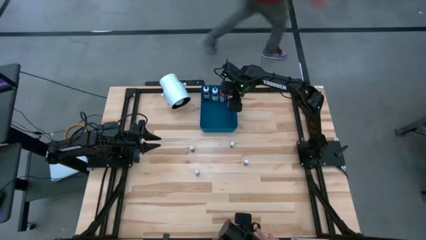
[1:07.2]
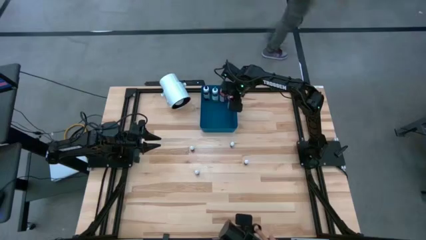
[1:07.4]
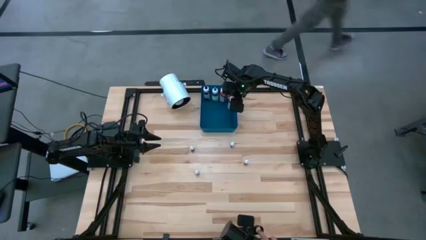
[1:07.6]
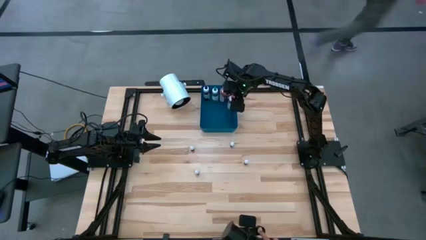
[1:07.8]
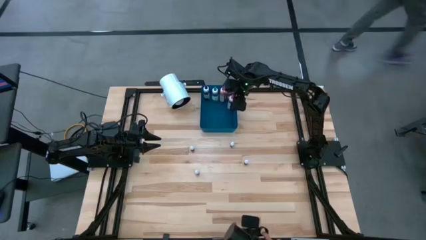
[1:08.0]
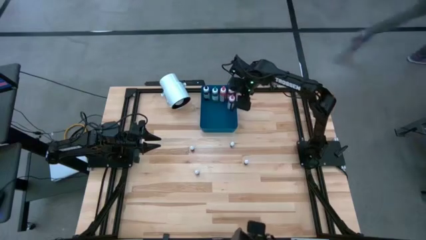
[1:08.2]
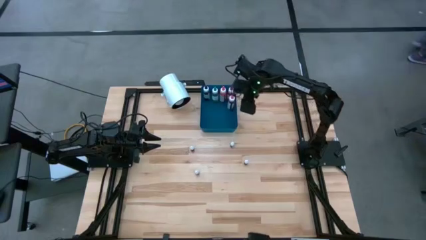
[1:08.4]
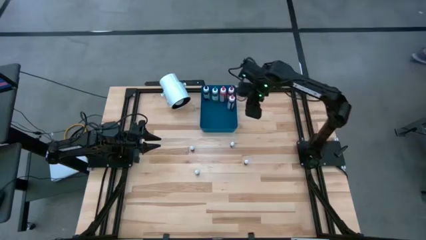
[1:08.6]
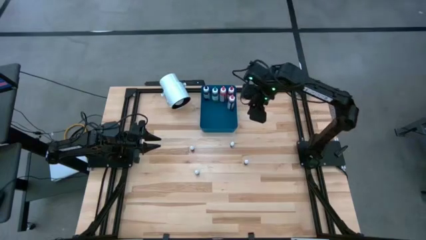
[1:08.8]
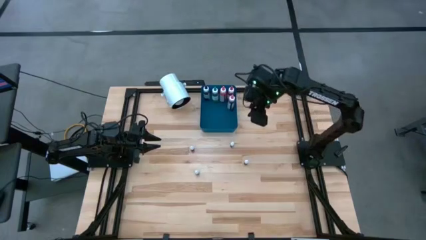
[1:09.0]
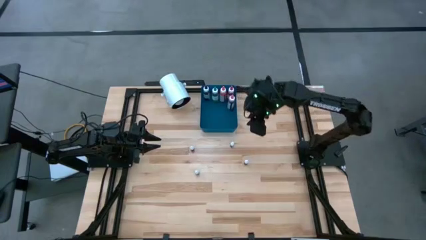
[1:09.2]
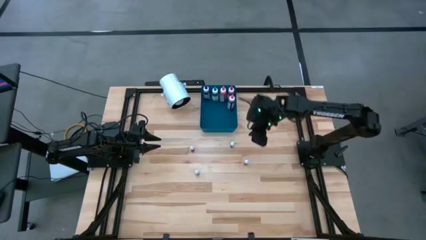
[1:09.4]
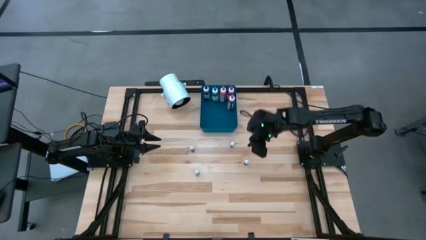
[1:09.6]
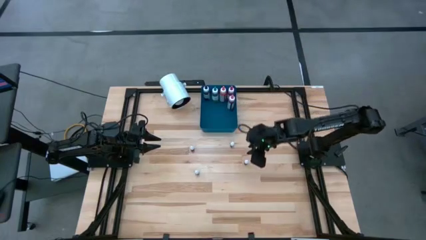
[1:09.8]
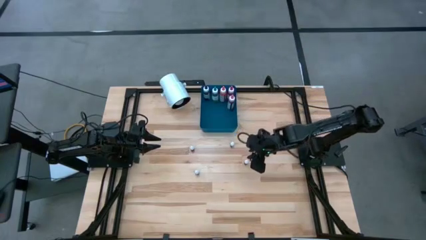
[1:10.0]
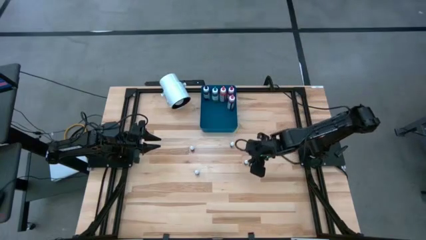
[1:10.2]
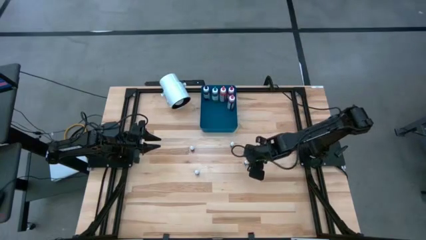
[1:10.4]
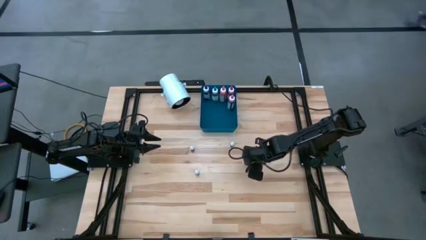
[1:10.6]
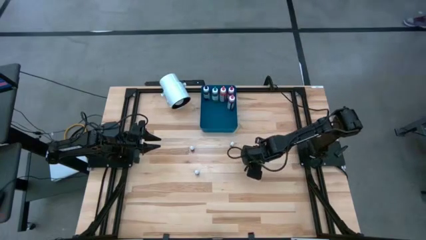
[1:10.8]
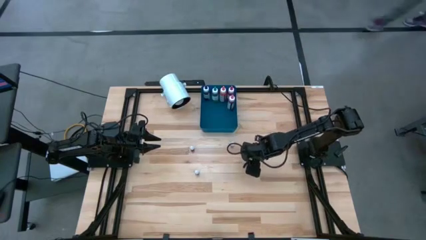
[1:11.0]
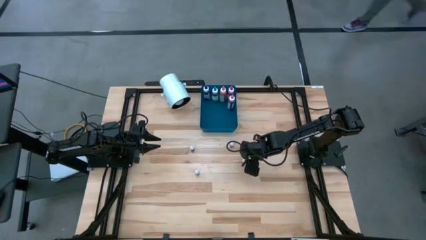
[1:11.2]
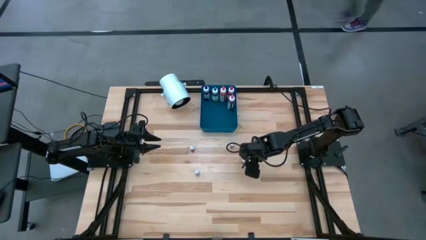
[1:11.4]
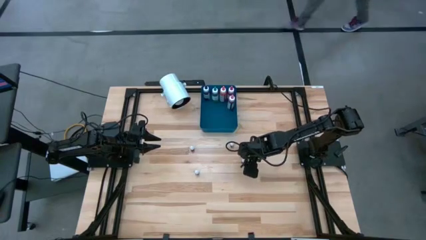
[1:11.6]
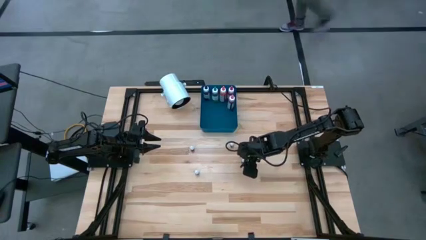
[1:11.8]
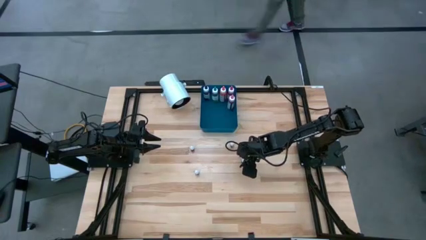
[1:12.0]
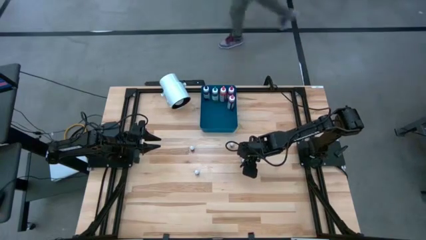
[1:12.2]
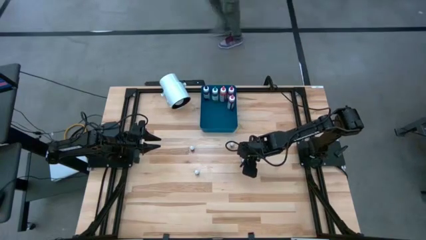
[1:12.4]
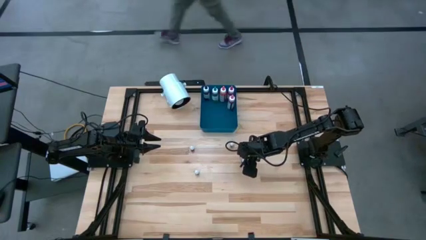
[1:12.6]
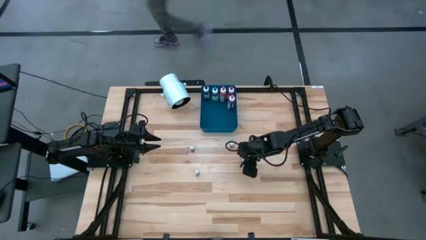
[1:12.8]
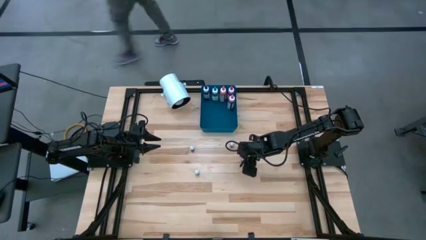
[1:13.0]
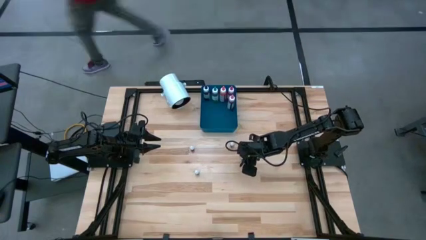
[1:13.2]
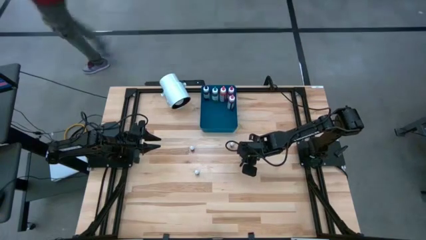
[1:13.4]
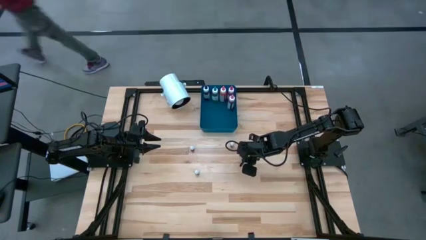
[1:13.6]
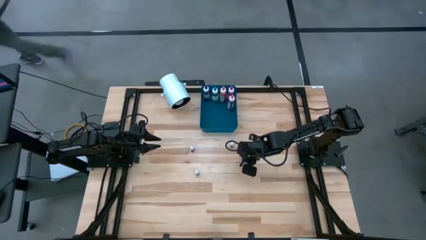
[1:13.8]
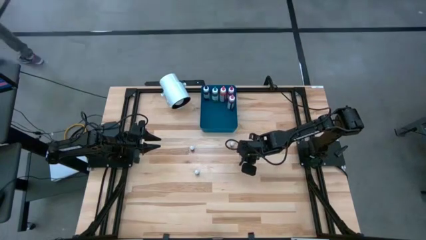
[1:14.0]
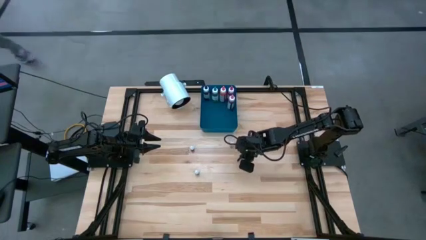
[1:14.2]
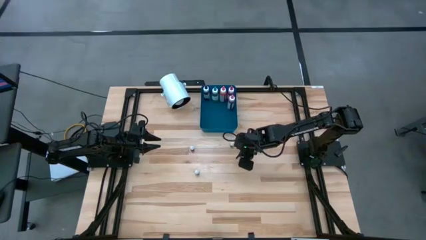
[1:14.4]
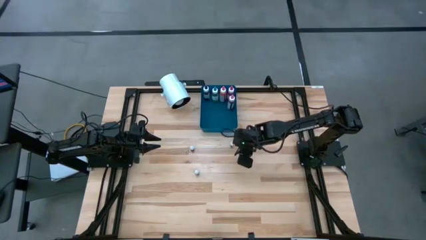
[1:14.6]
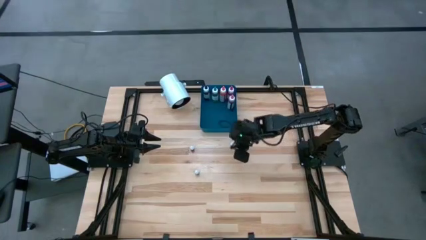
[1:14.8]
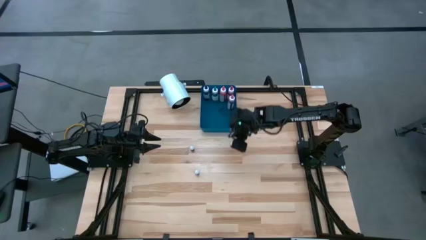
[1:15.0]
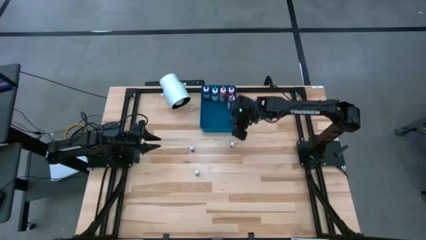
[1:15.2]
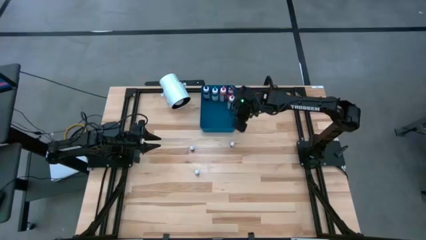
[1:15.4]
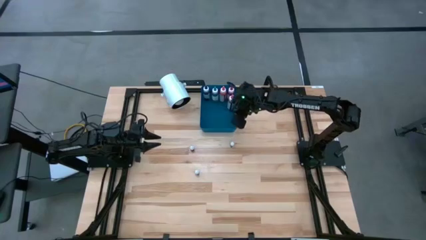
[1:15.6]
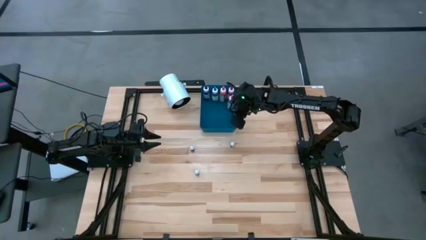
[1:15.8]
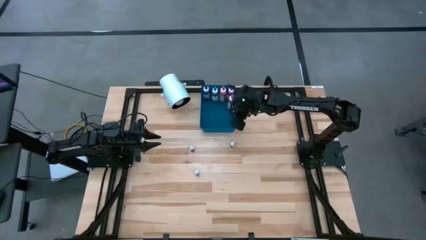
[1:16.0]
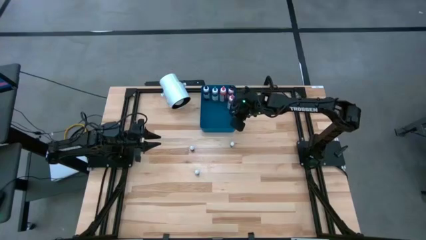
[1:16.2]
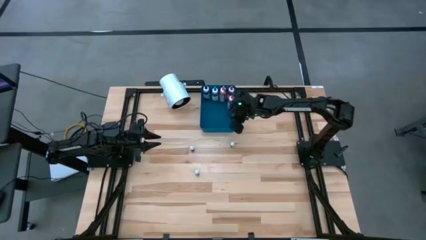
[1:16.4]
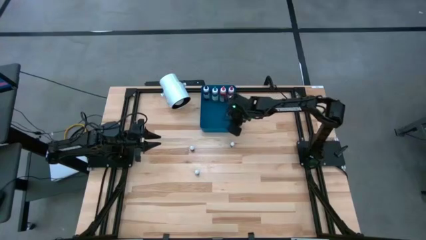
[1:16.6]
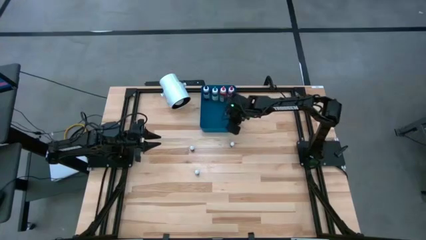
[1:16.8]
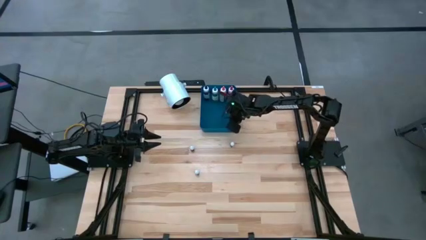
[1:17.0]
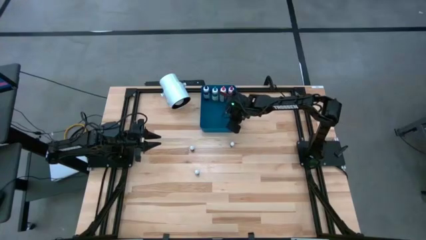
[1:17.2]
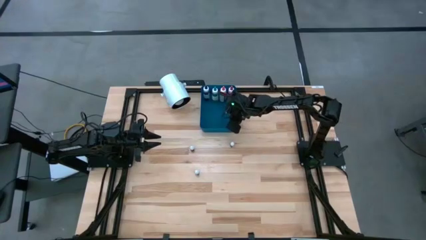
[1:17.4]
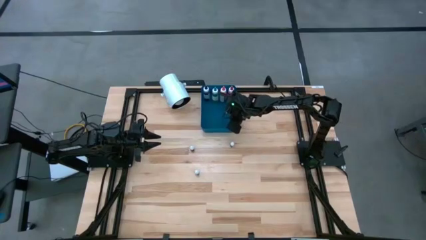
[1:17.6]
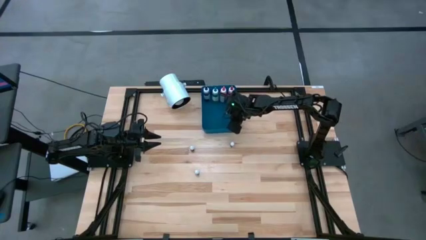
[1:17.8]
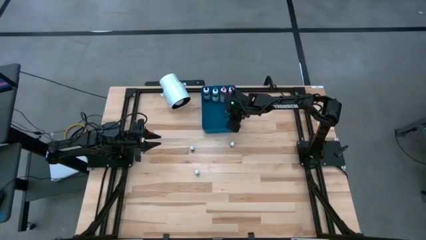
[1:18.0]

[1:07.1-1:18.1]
Task: Pick & Place food coloring
Put the right small black food coloring bottle into the blue bin

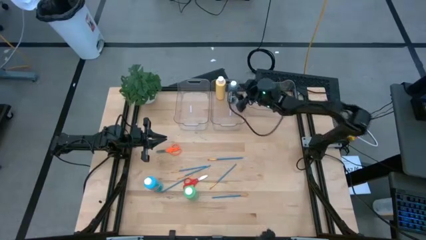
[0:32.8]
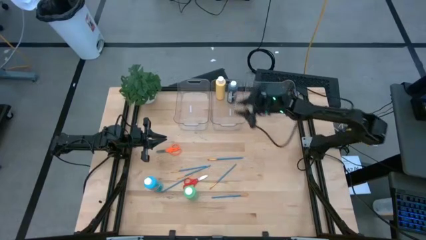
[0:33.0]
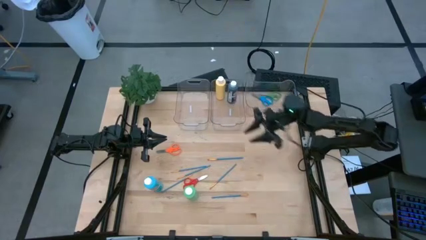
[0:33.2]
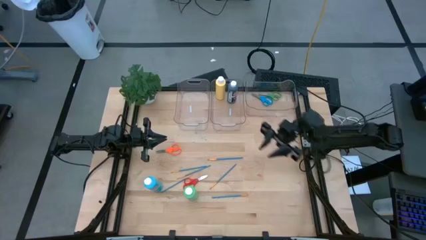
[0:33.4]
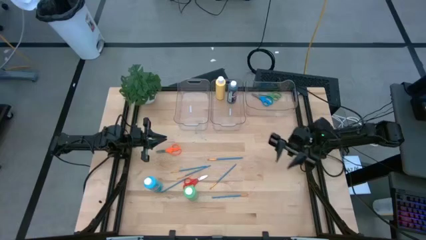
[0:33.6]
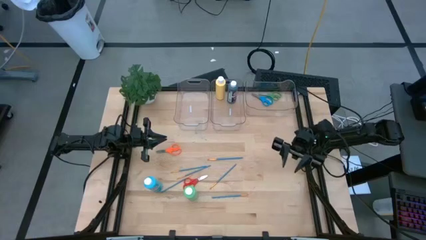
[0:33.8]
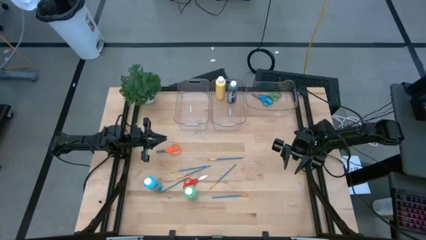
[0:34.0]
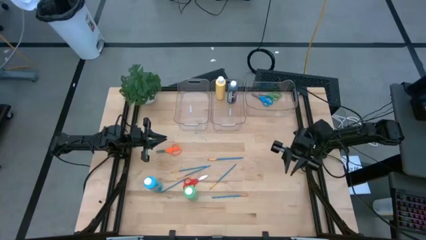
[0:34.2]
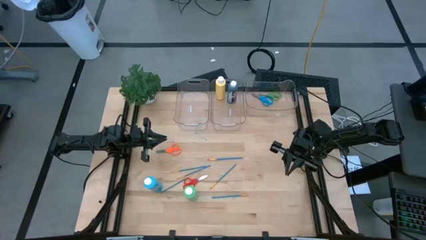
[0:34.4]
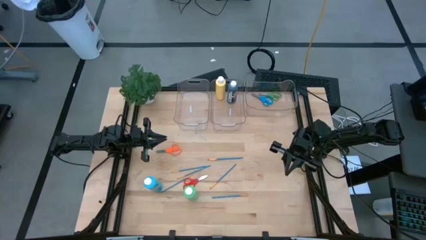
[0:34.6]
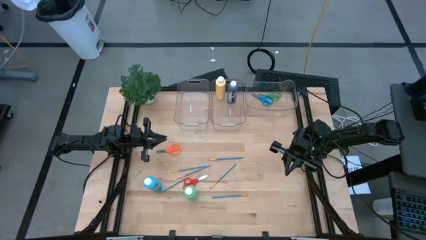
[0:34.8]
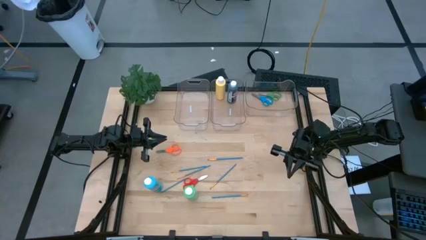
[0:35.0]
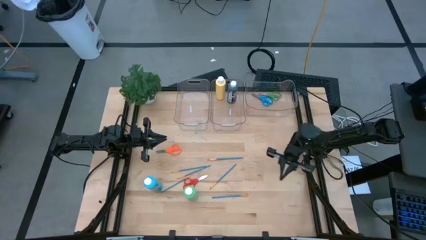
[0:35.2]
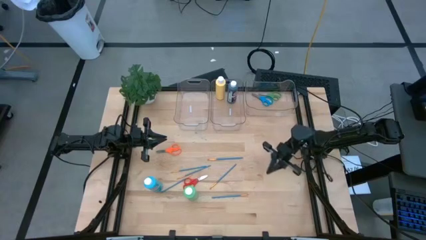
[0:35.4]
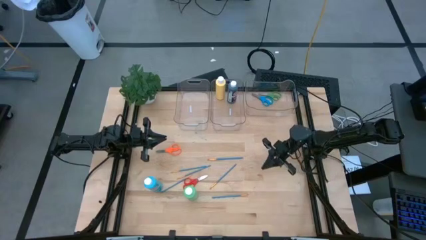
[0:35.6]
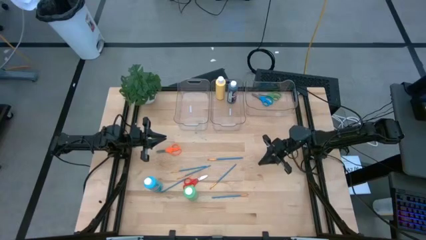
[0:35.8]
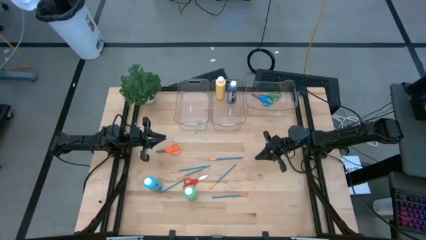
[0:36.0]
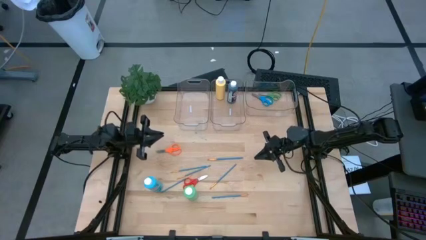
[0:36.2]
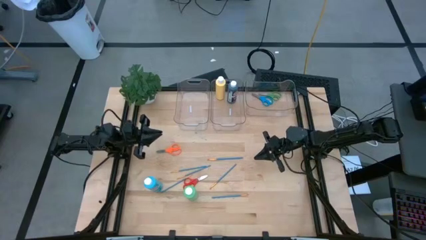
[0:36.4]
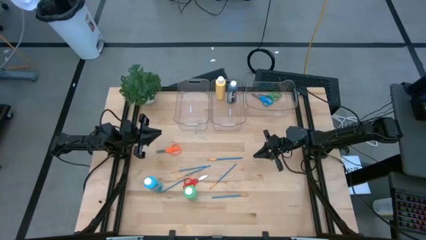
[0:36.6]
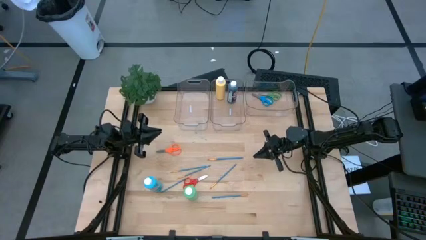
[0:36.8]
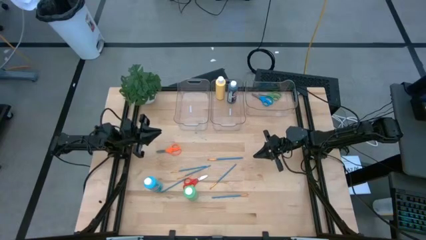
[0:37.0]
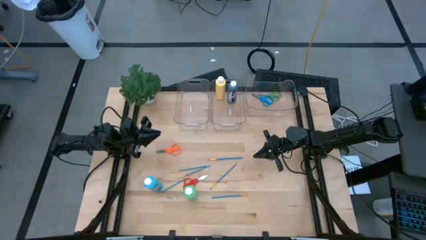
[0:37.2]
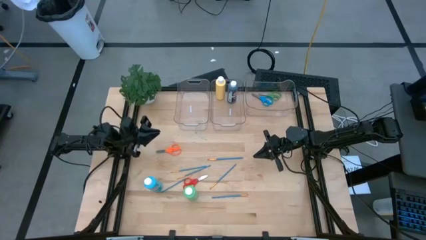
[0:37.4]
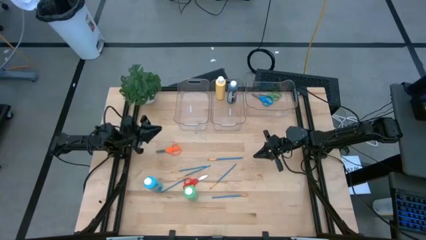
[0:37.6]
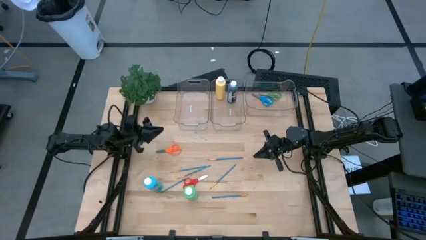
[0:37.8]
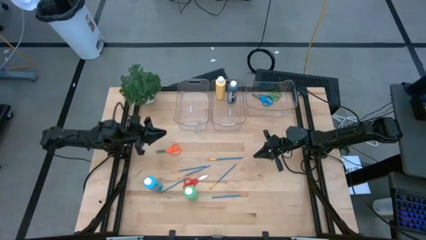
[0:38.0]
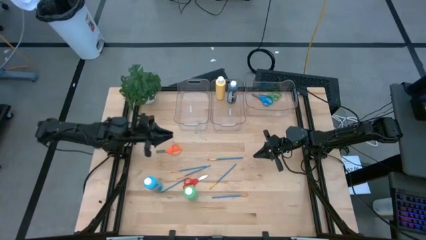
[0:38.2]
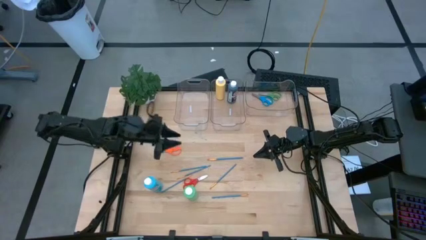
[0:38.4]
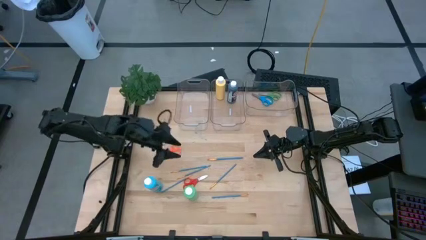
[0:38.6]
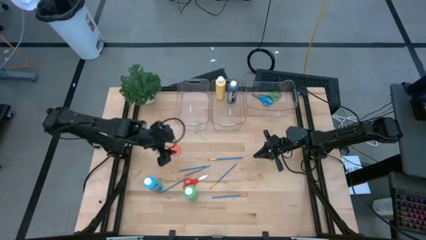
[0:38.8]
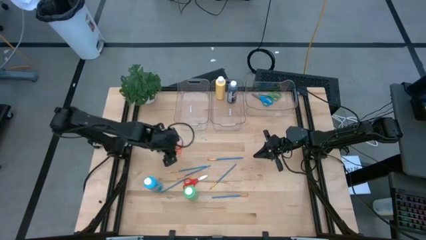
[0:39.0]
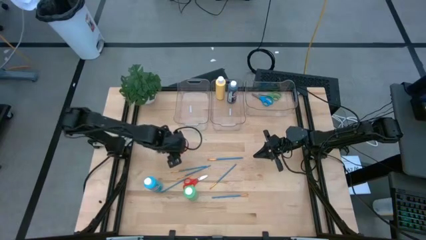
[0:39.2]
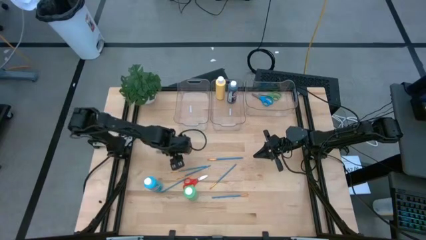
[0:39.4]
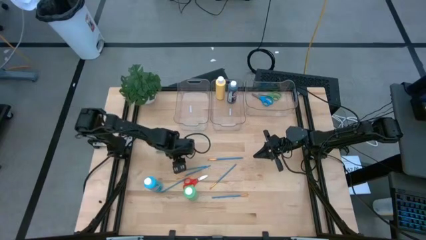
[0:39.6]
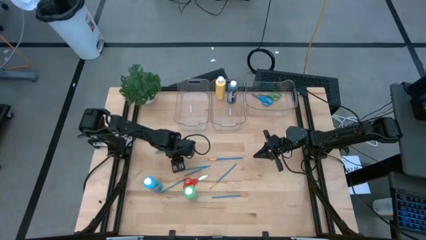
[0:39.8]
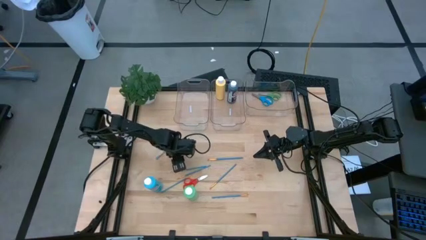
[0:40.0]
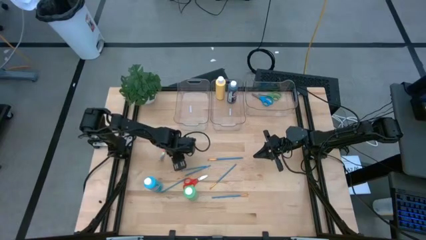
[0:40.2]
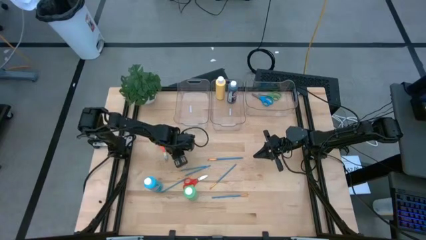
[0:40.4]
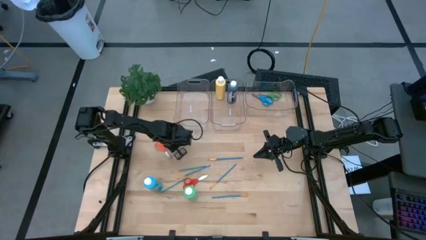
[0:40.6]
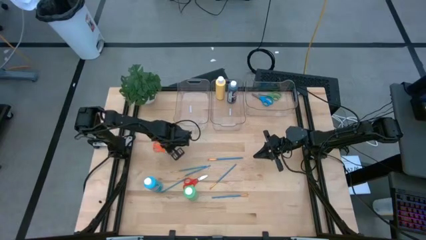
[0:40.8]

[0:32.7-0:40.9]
Task: Pick & Place Paint Supplies
Put the orange scissors into the right transparent bin
